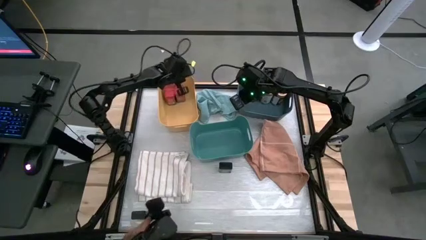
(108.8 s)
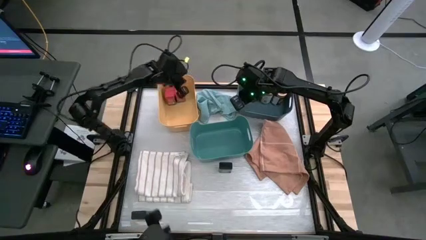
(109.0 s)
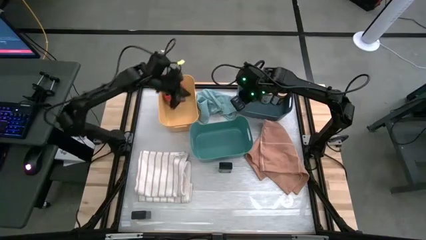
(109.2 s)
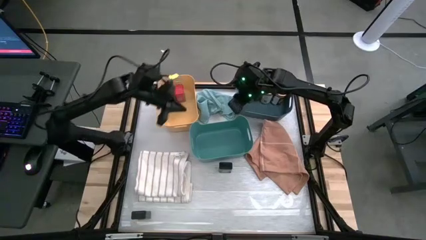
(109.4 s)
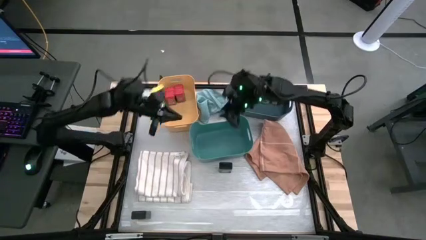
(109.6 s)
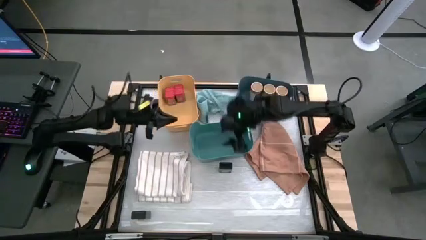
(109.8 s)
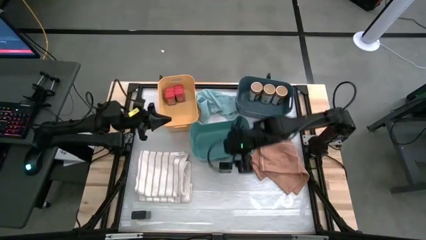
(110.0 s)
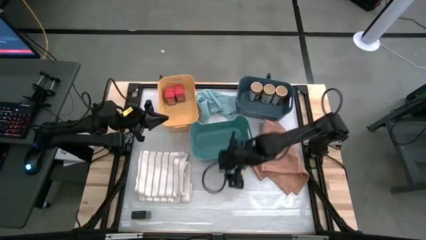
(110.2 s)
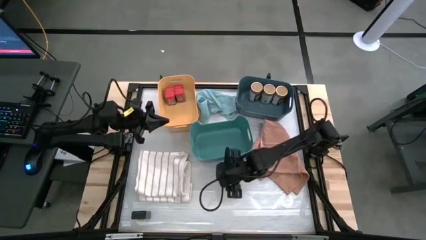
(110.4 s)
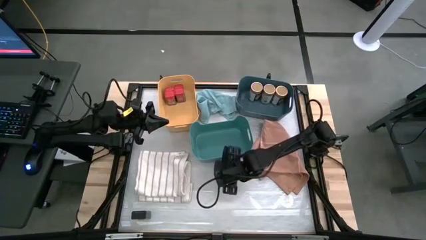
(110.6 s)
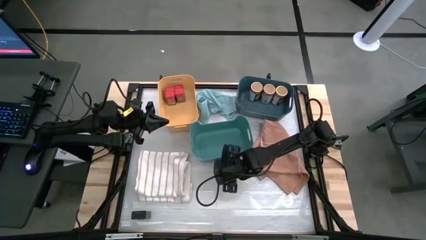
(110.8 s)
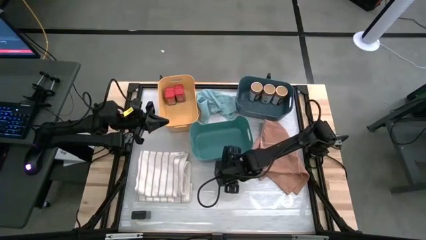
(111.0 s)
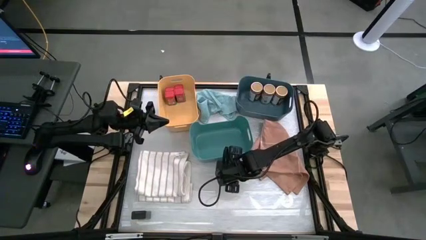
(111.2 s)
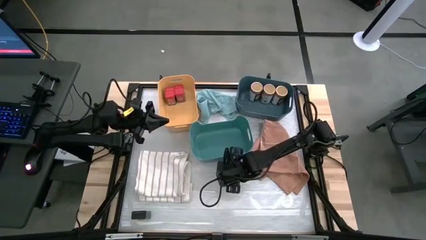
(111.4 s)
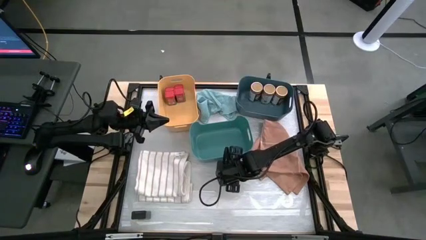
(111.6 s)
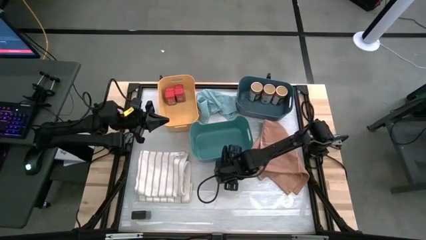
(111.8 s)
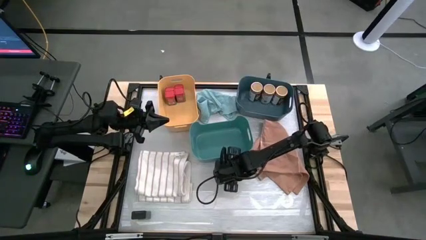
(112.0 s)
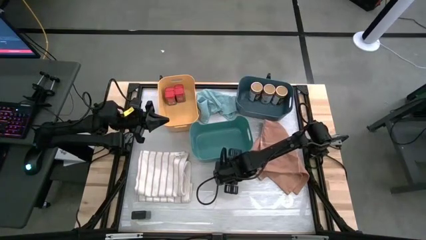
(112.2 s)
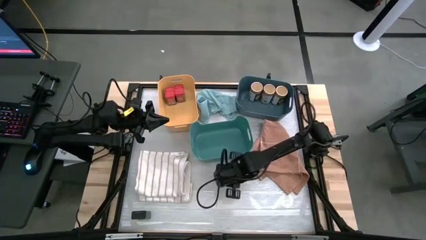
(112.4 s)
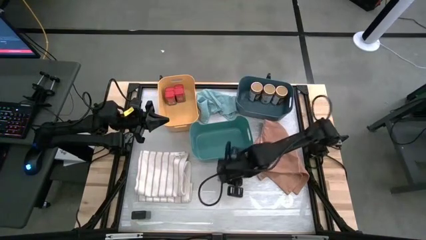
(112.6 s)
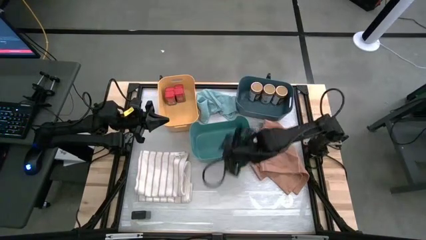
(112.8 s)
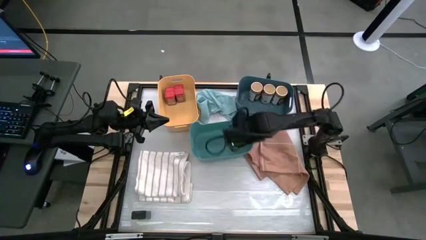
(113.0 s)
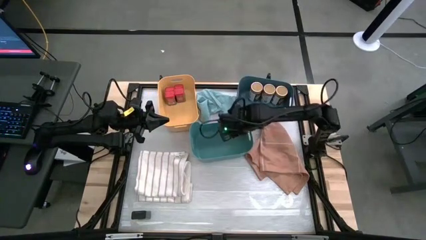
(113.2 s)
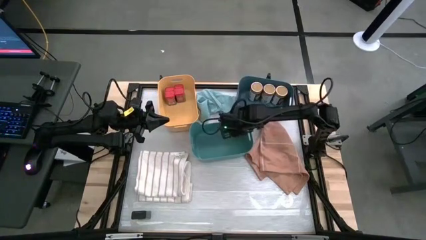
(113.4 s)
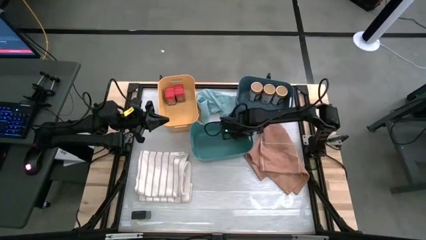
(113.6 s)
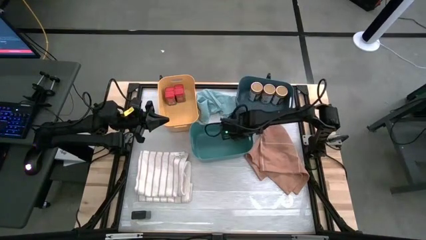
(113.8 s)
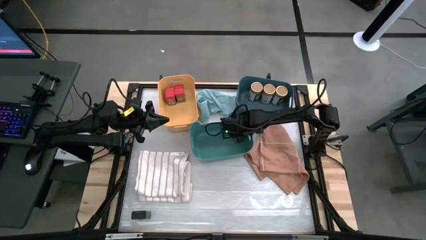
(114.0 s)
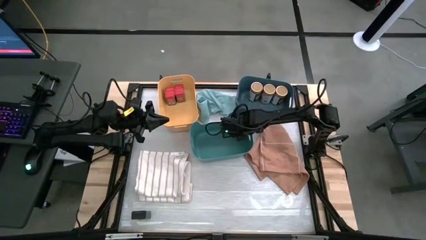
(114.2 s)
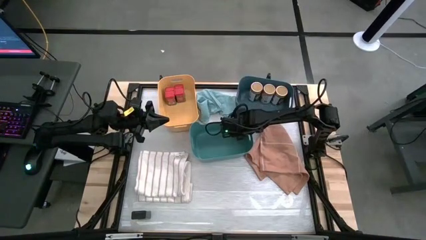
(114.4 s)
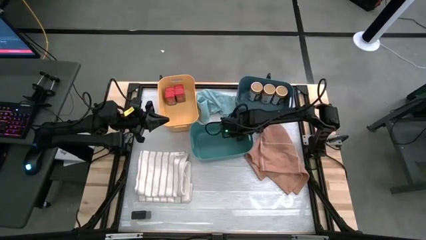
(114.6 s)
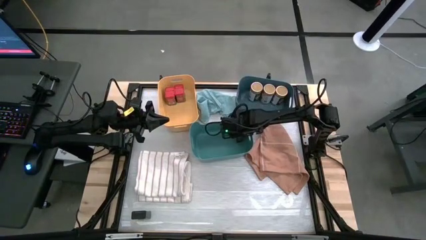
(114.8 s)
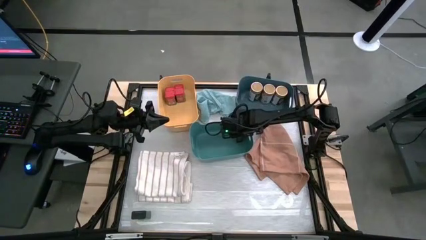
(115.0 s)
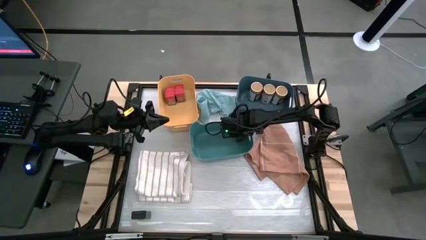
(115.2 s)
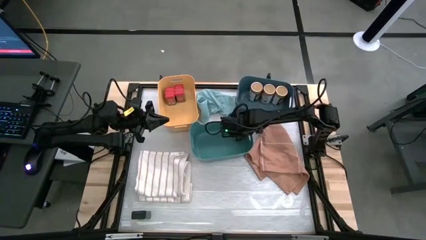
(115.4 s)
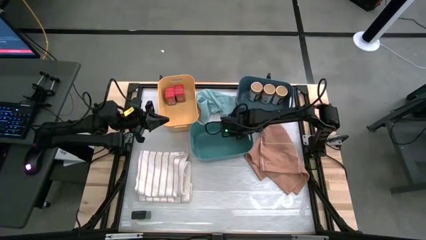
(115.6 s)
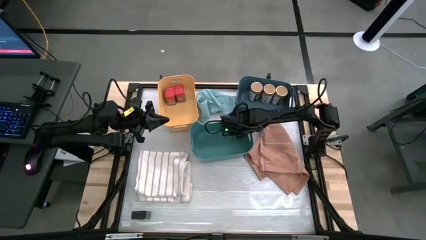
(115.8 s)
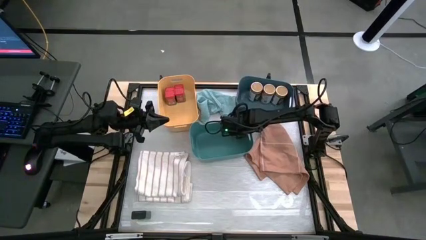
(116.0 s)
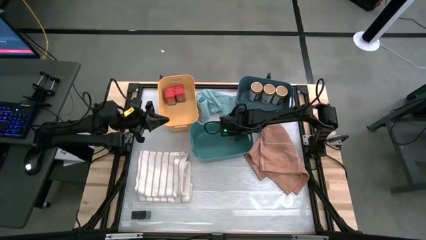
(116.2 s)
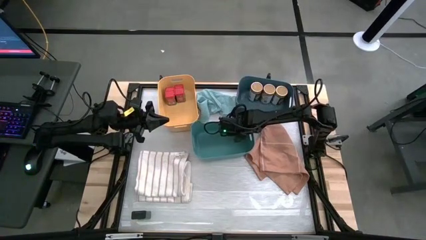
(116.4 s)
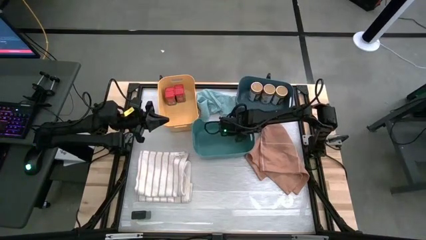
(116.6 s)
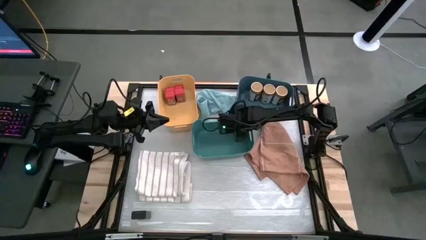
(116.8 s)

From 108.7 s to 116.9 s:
Task: Sort spices by type
Put the top green seasoning can into the green bin
